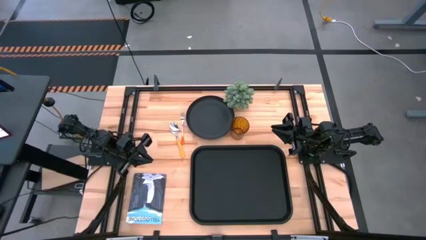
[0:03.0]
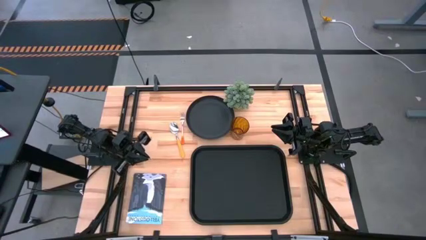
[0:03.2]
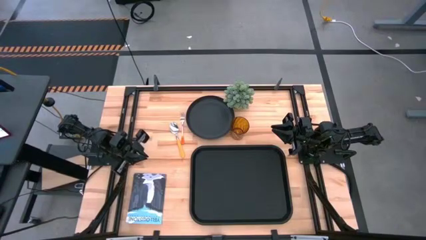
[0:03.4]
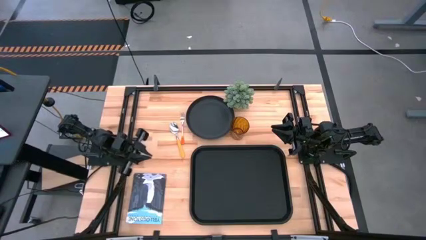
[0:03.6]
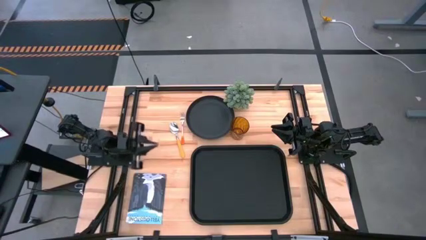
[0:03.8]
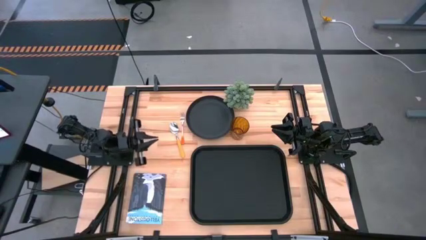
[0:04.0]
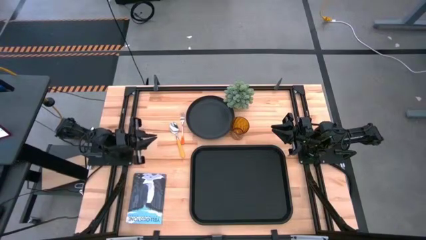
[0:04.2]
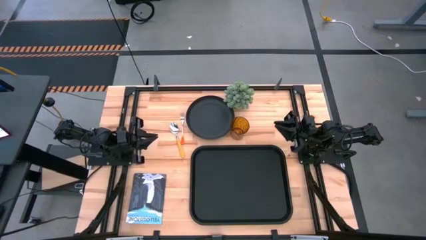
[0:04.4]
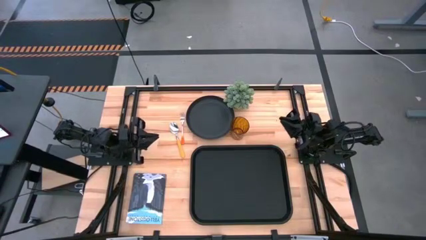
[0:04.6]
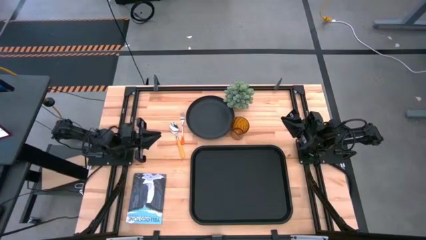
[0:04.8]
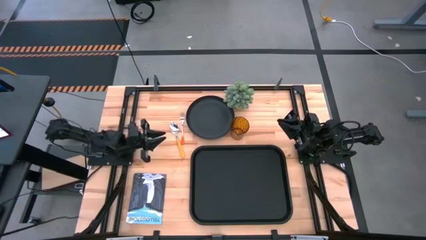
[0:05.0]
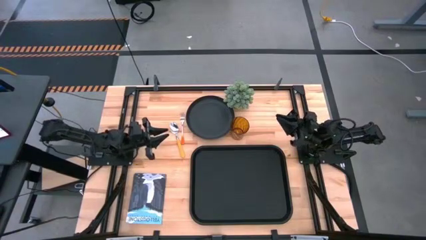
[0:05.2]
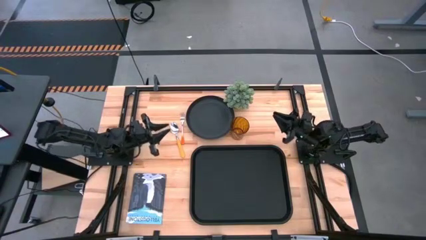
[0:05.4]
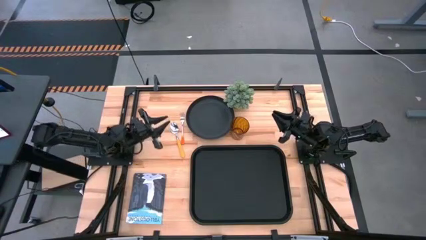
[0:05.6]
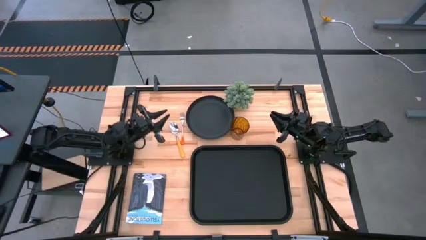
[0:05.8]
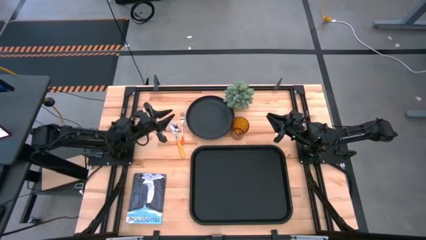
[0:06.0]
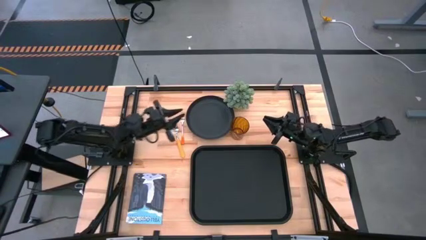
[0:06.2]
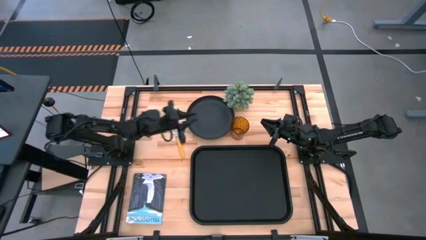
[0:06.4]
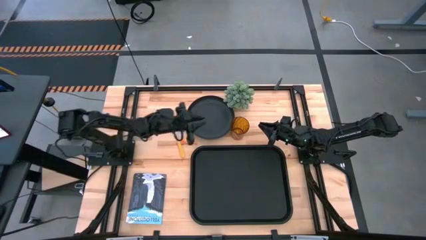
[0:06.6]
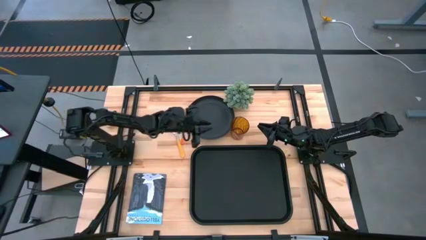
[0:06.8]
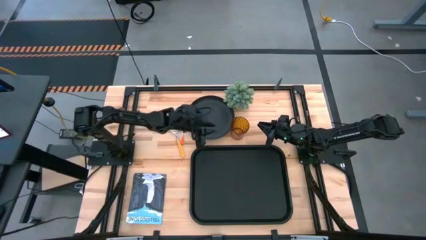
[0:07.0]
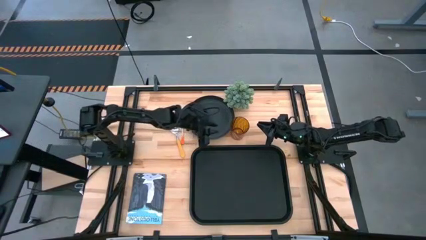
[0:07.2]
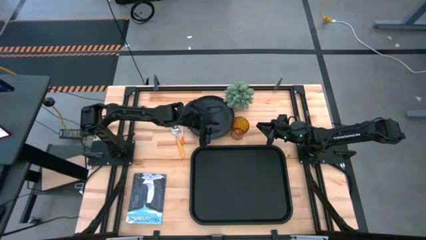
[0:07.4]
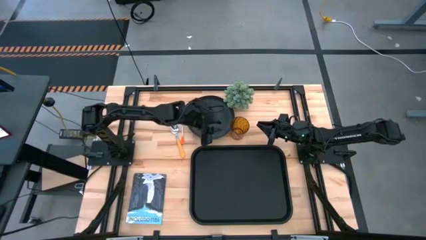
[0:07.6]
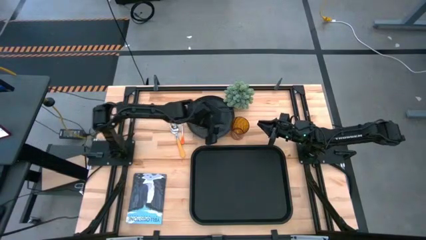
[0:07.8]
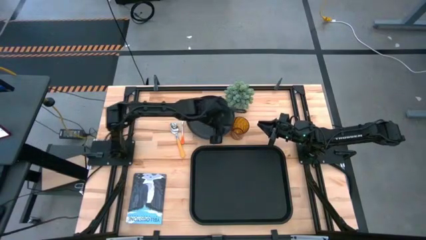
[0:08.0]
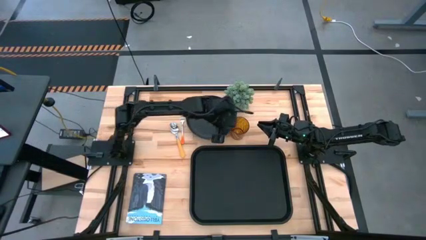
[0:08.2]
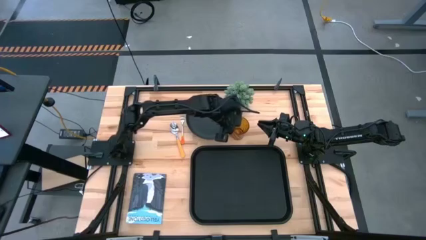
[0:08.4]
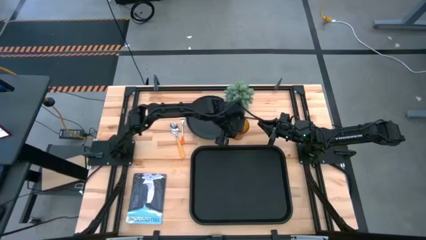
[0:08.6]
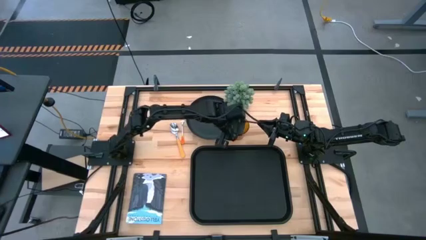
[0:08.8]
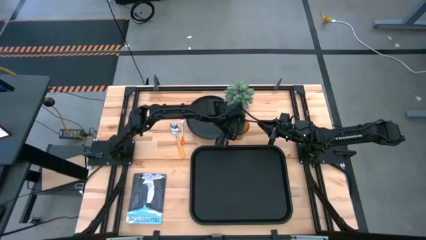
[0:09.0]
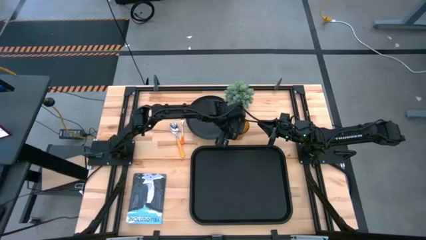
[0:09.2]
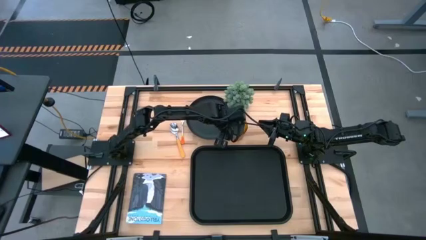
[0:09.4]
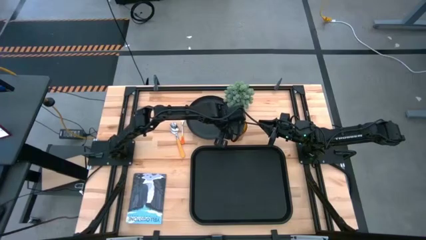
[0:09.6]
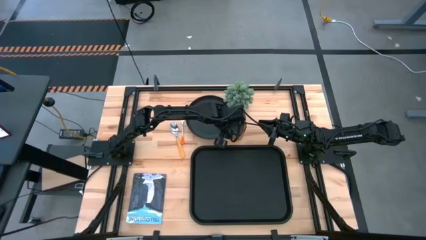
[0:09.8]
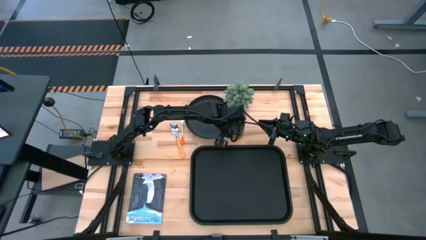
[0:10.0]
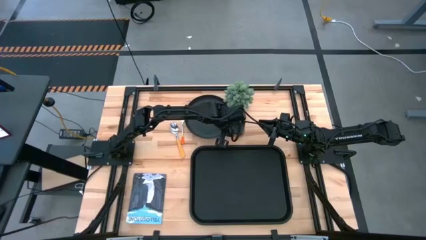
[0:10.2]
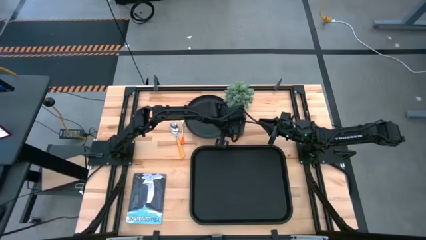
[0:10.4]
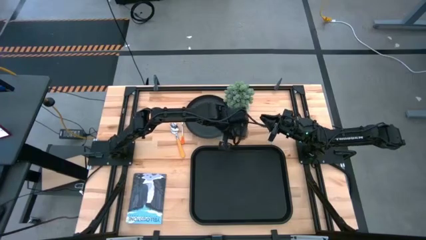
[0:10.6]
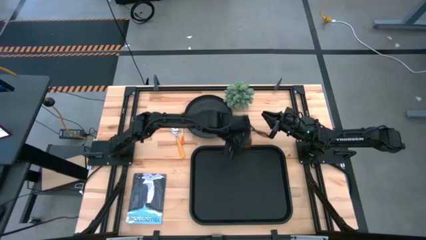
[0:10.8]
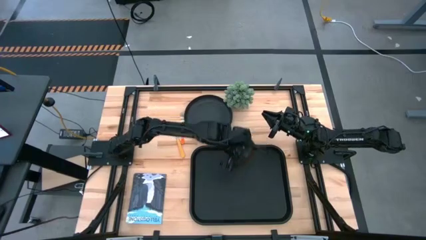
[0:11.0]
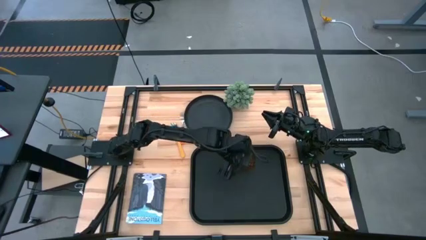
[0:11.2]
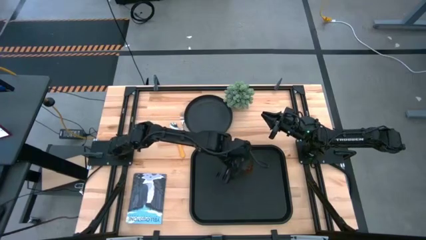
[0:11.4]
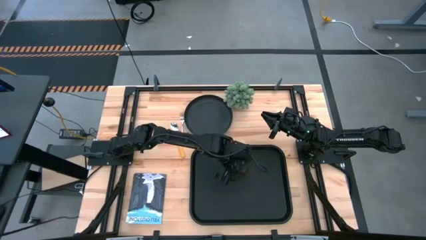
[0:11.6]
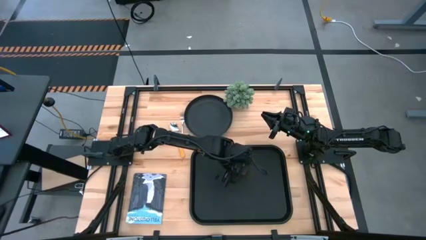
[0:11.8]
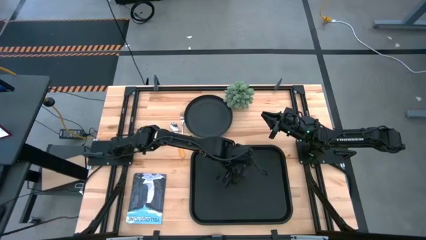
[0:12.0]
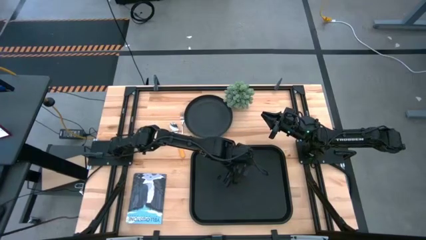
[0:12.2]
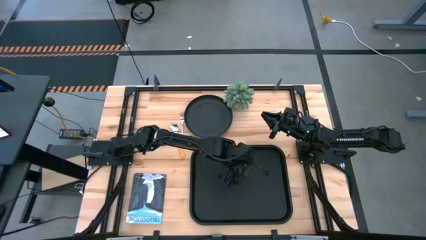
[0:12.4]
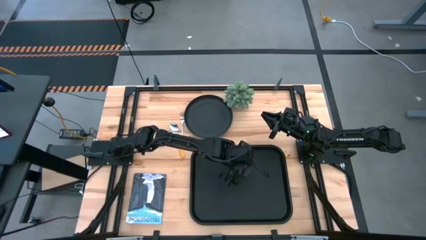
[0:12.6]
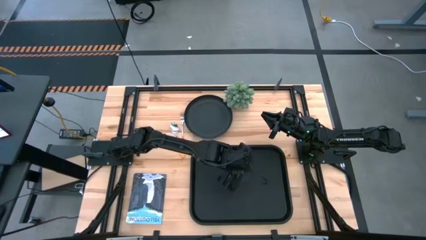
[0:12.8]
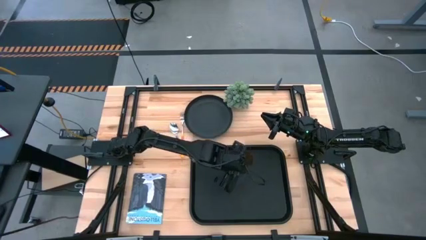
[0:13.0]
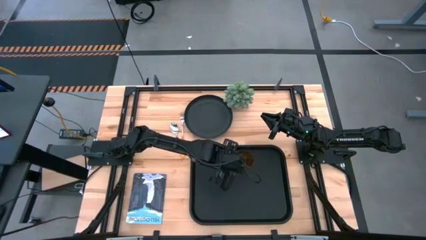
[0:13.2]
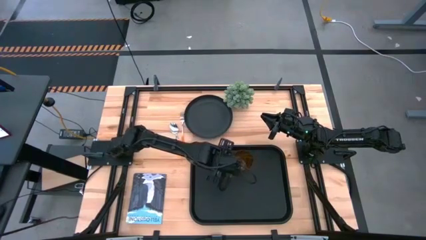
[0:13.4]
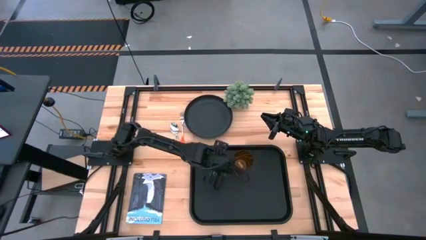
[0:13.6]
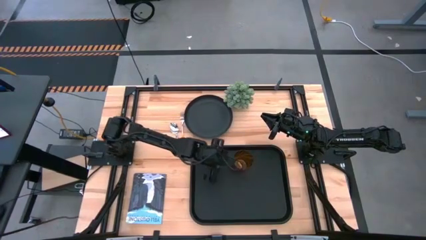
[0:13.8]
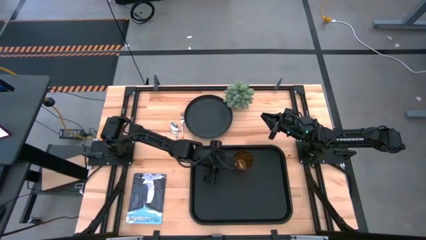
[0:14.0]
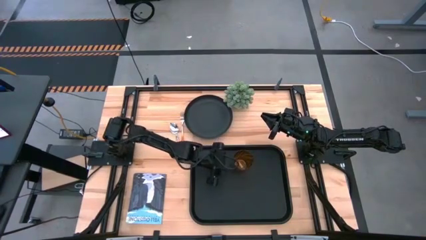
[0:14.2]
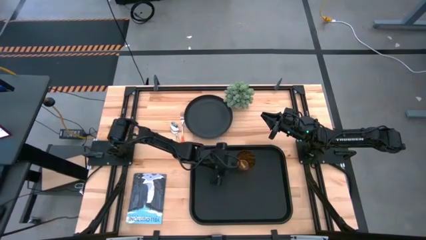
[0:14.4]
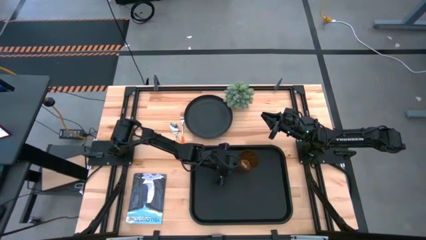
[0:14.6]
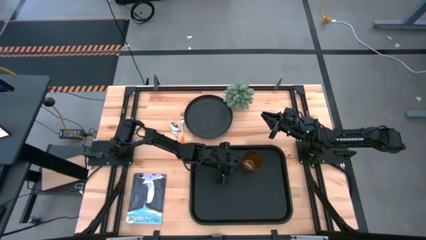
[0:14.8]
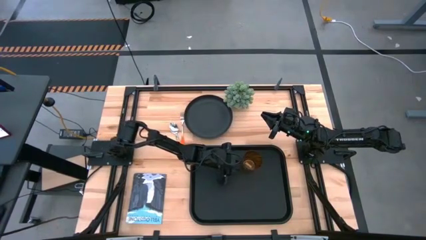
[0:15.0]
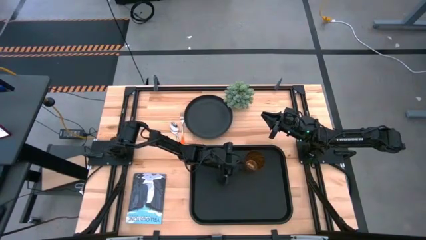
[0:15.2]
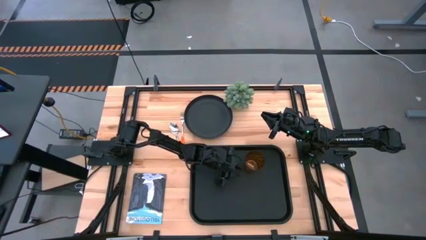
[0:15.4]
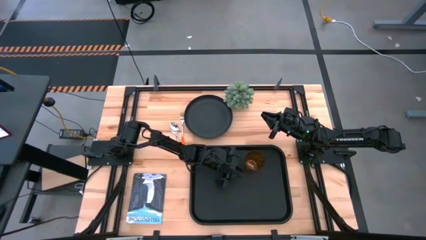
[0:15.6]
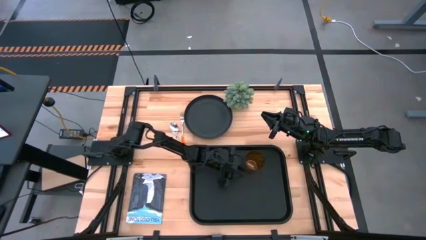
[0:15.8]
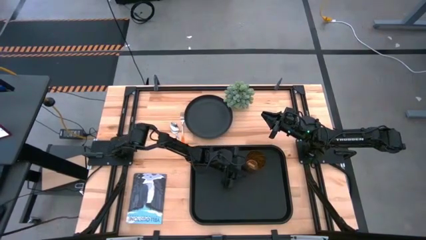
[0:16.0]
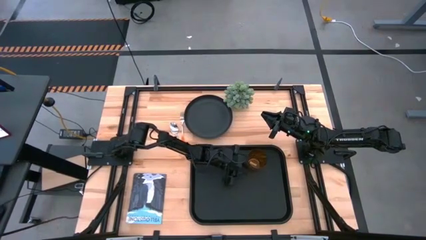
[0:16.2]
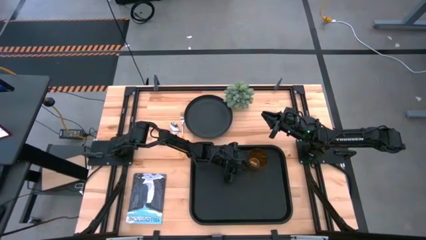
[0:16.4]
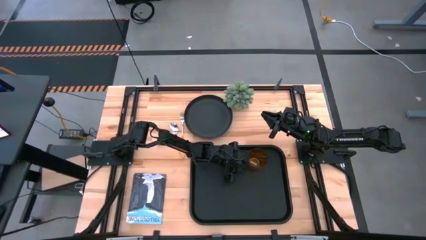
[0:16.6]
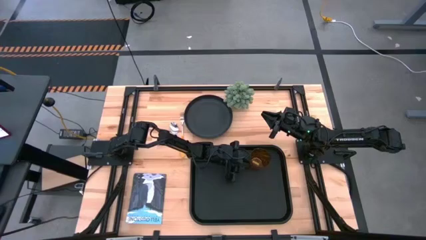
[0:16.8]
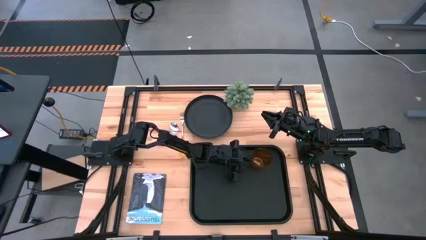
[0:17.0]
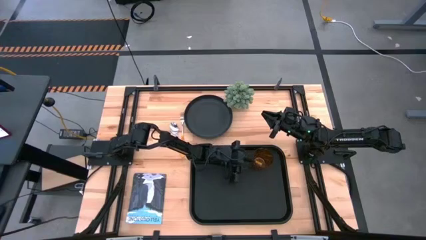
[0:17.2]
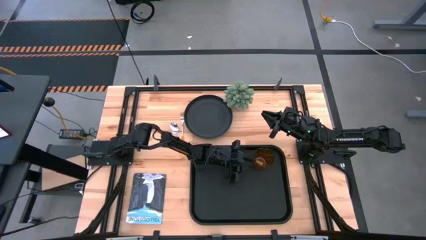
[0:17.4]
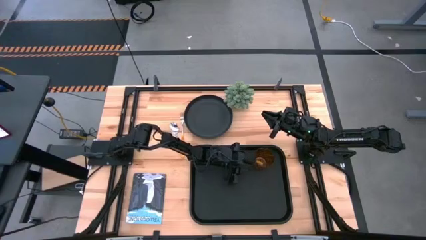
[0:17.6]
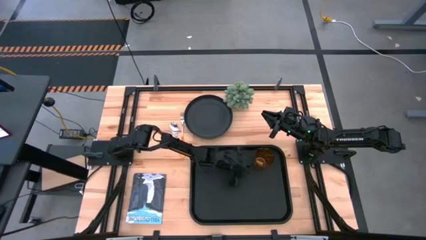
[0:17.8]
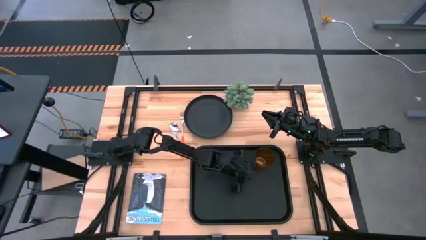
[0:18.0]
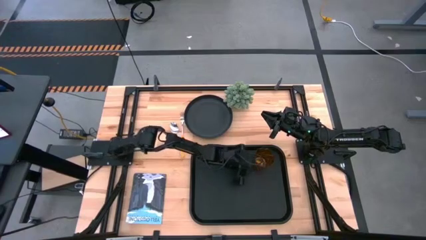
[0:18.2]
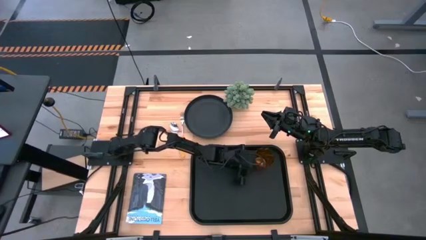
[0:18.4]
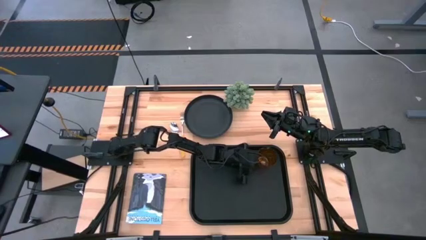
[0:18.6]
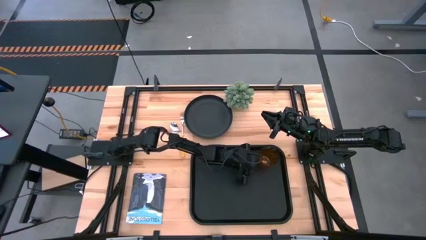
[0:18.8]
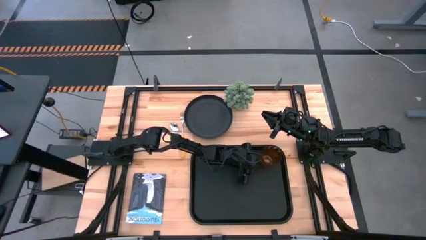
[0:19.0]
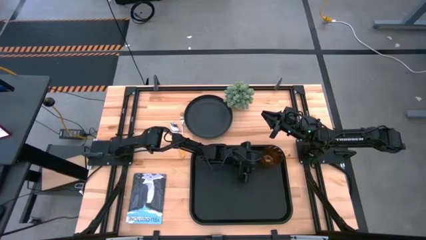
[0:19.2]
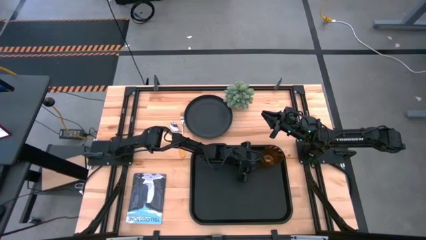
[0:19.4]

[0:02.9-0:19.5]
Task: Pick and place plate/cup/fork/spoon on tray
Put the brown glass on the top right of the black serving tray
